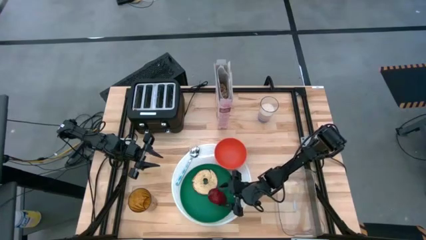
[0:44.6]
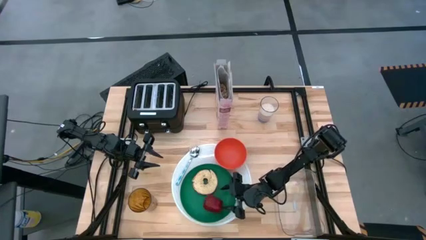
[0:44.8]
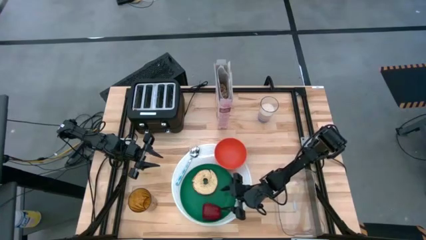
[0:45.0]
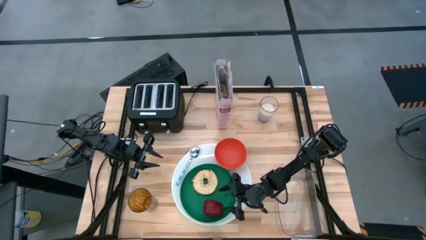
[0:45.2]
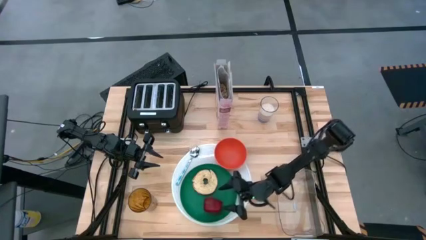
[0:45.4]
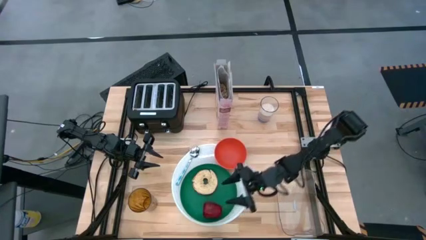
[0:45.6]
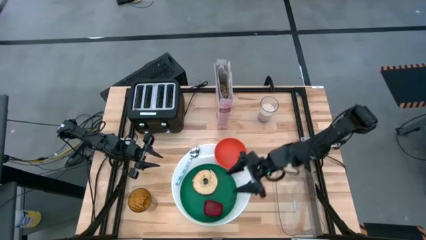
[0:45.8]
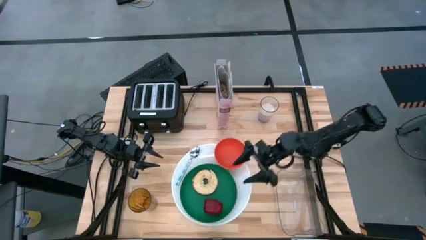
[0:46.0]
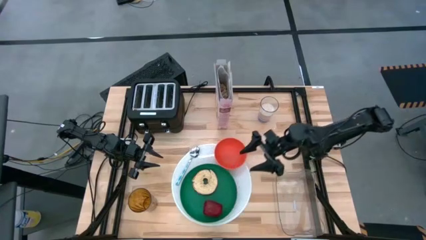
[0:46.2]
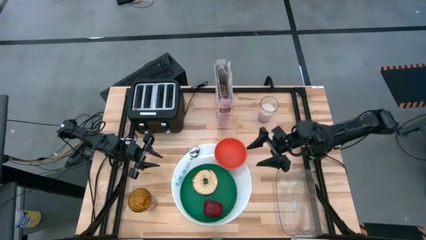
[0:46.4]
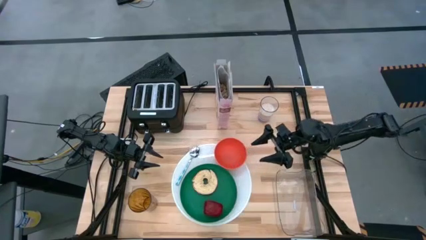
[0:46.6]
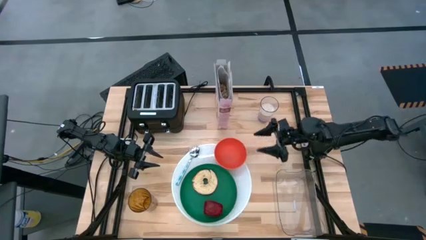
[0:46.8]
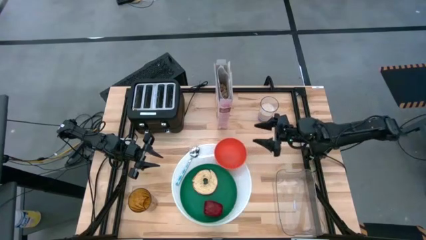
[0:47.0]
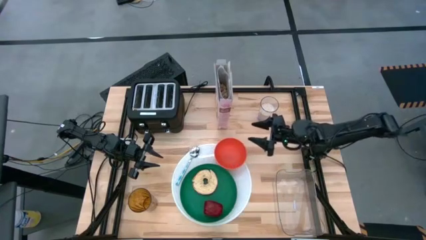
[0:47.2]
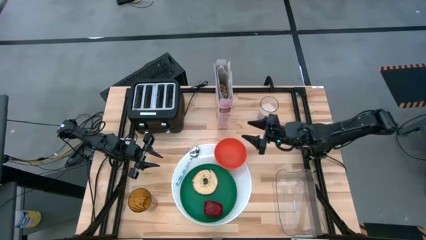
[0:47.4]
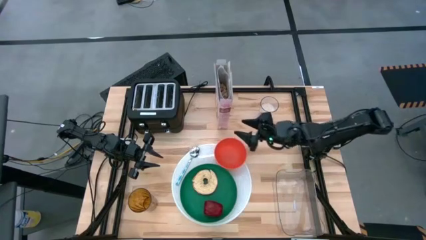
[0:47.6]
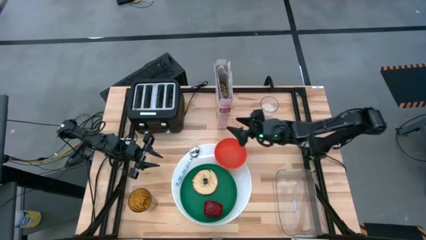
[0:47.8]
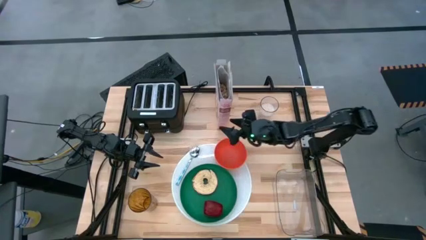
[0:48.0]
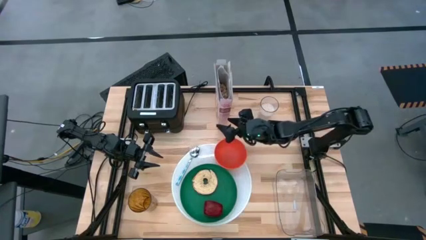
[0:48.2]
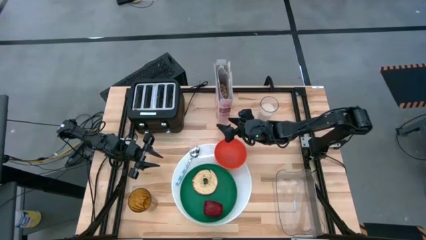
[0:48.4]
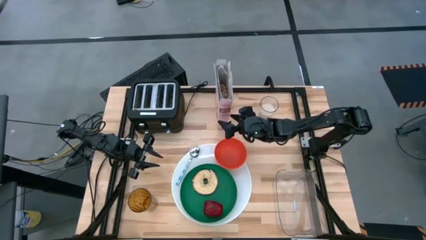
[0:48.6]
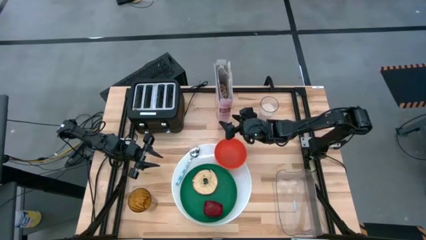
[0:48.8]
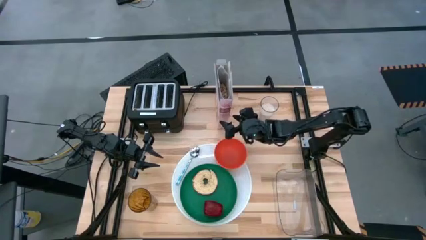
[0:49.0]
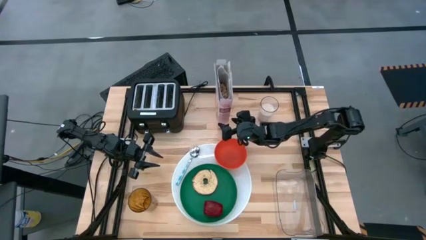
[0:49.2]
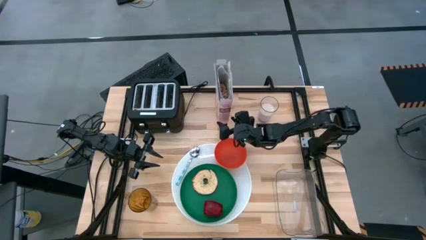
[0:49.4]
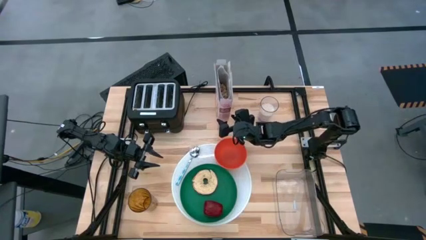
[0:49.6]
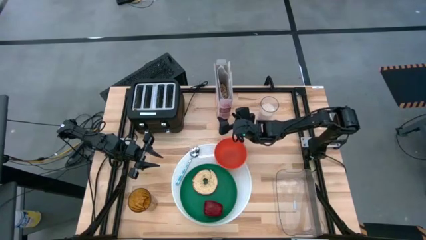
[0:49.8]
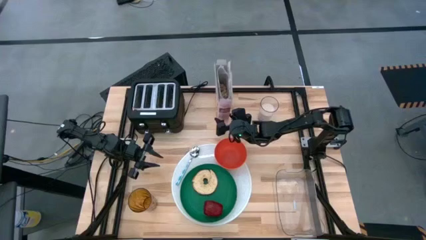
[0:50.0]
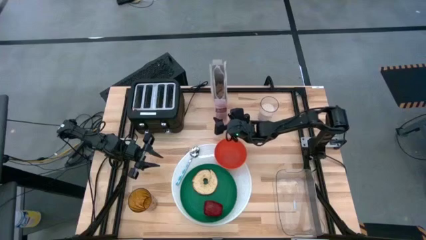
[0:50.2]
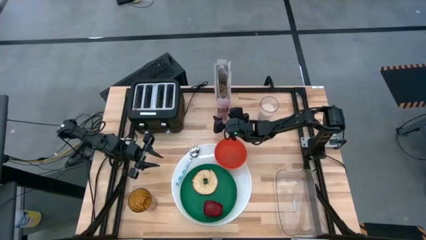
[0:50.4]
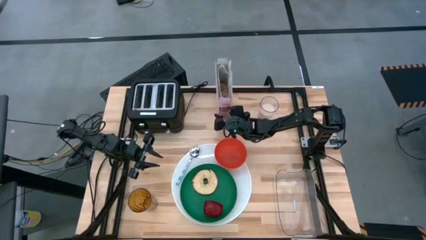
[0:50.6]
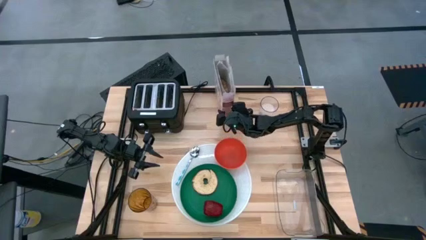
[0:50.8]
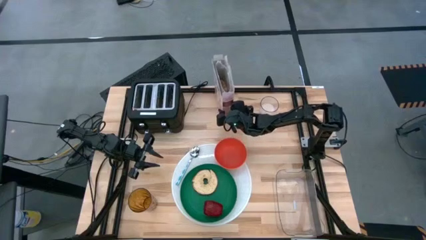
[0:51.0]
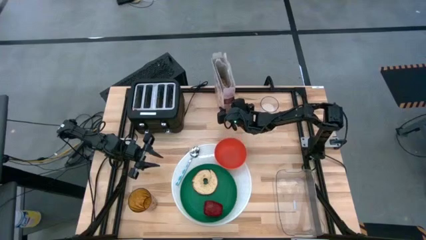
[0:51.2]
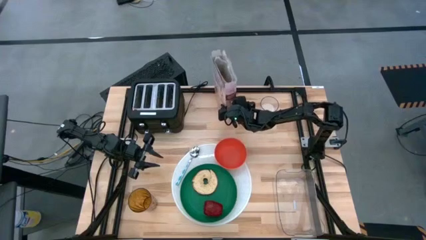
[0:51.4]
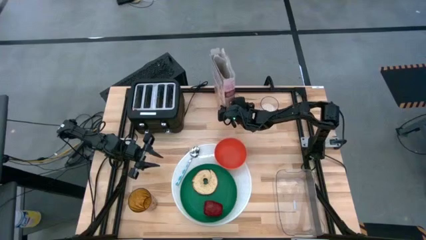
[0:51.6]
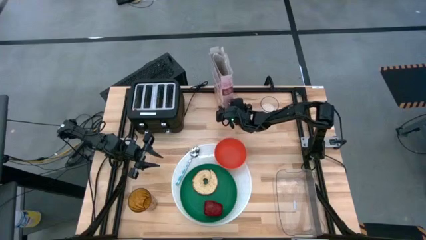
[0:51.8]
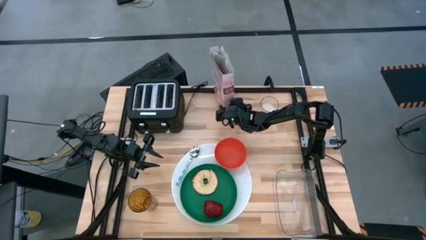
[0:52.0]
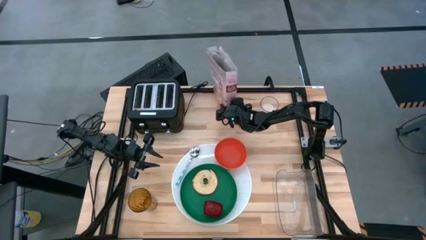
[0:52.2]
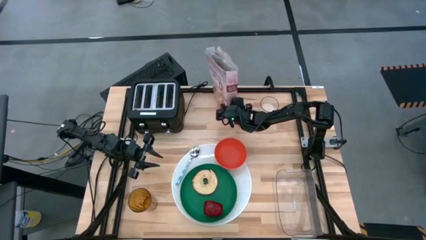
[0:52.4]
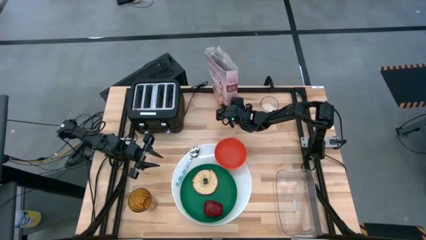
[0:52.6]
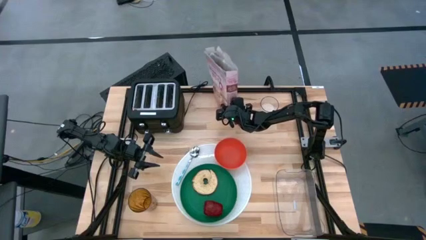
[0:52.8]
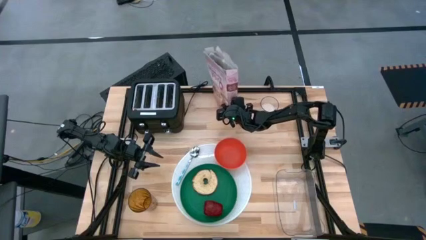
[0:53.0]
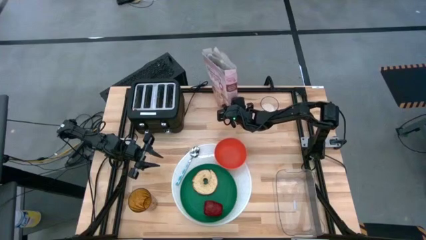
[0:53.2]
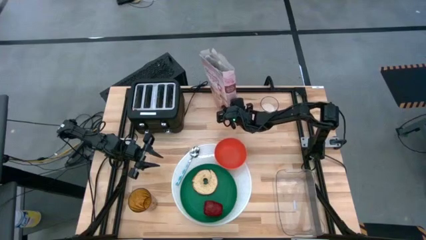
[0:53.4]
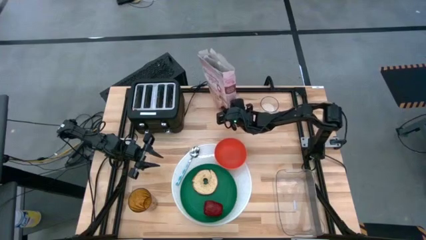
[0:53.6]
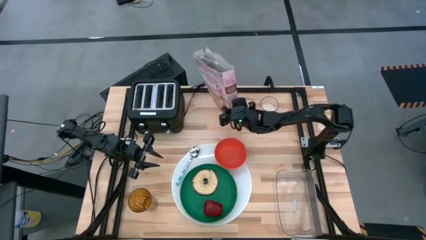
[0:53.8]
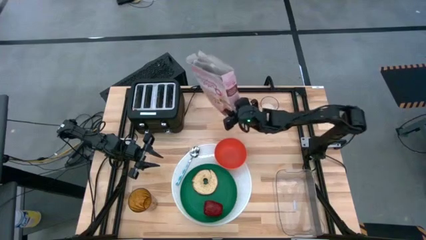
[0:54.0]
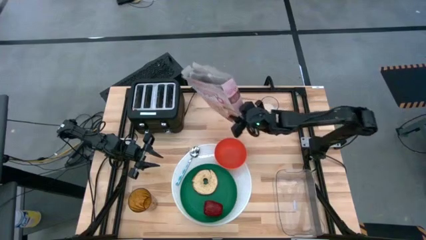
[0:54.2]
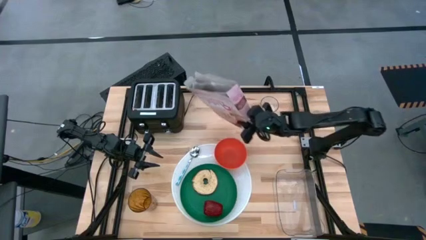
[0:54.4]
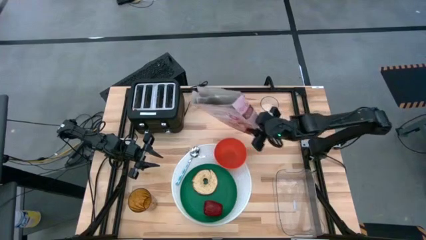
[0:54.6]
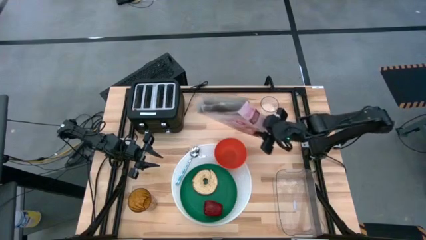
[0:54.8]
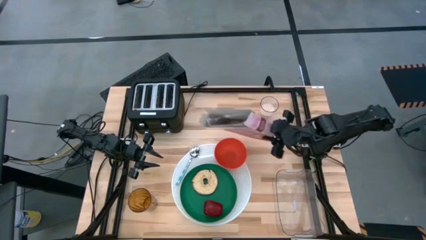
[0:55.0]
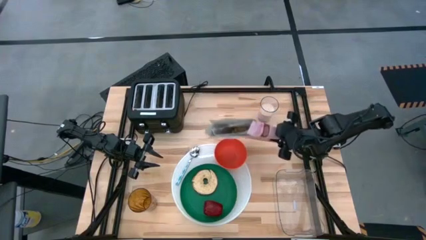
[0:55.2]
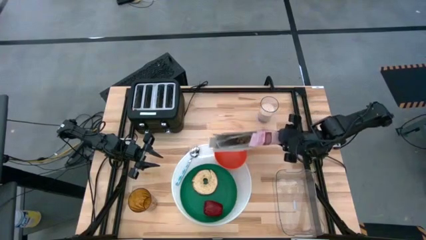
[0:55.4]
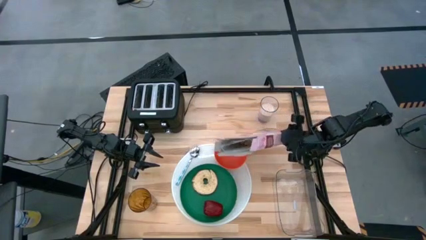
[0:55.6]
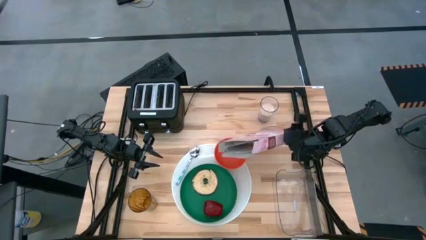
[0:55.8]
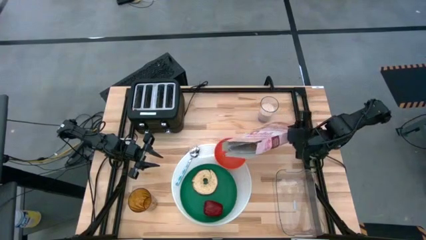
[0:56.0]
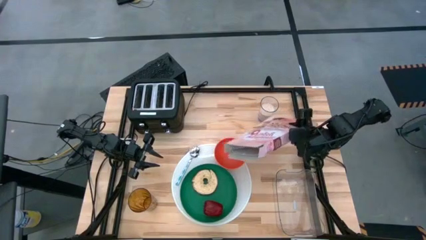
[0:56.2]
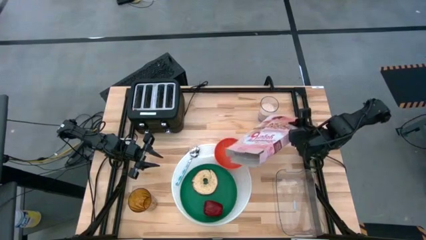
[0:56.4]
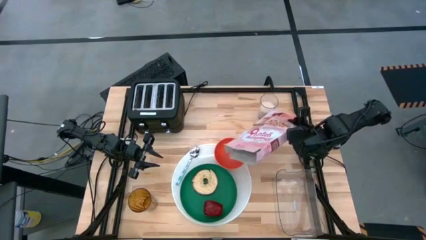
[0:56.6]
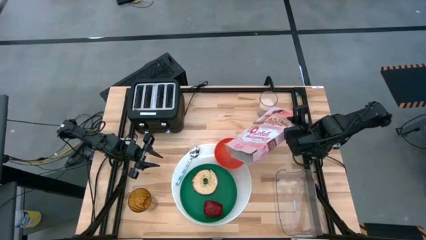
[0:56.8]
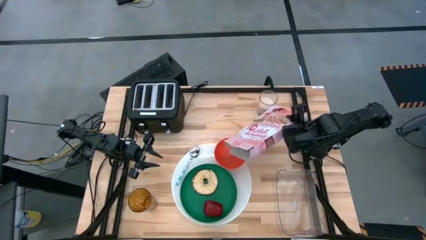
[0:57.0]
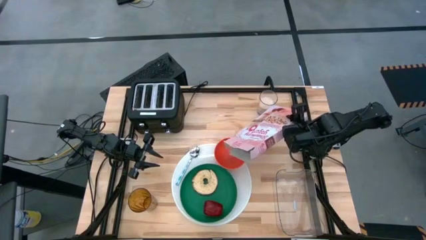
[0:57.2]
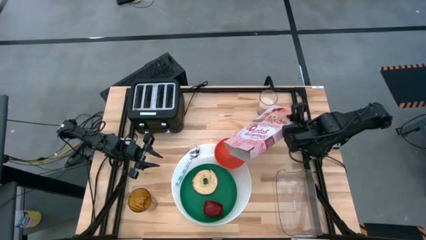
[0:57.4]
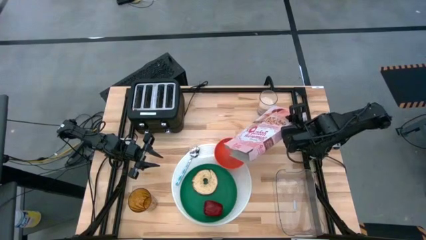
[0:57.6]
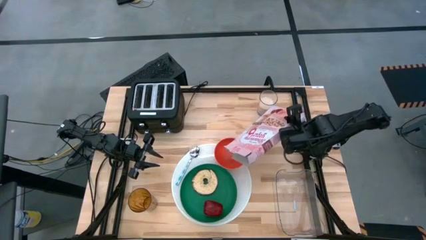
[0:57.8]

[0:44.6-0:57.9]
Task: Arrange a breakfast setting
Pour the cereal from the cereal box into the orange bowl
